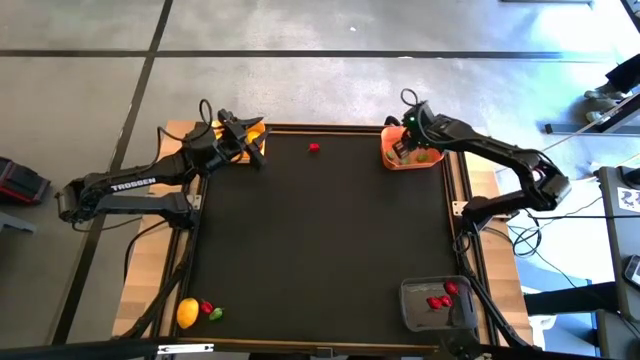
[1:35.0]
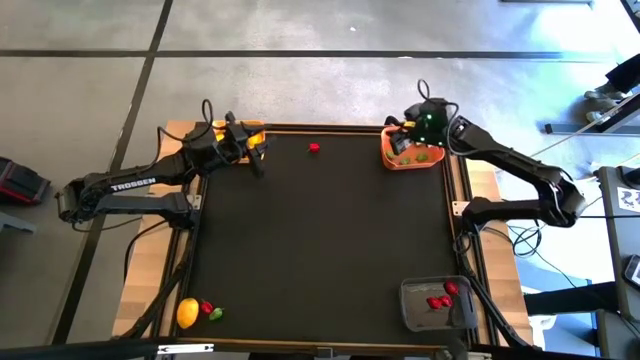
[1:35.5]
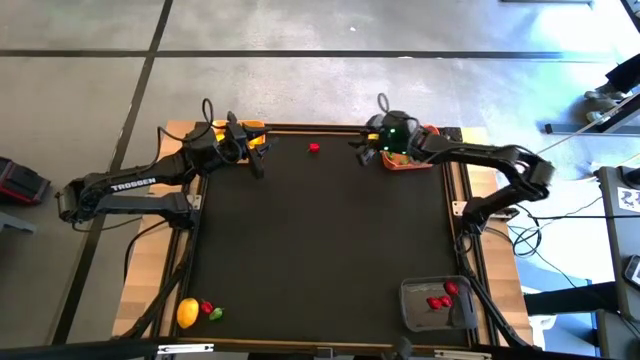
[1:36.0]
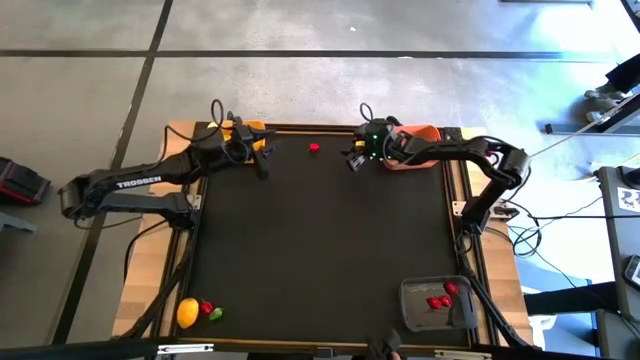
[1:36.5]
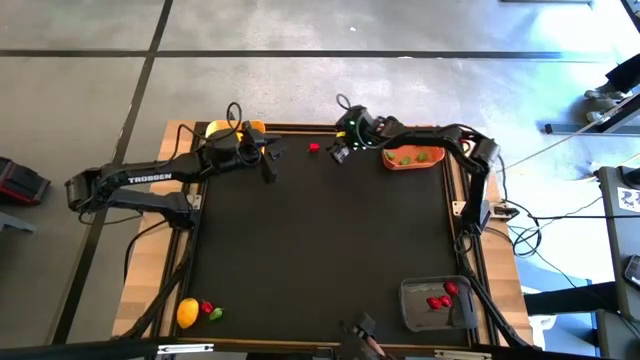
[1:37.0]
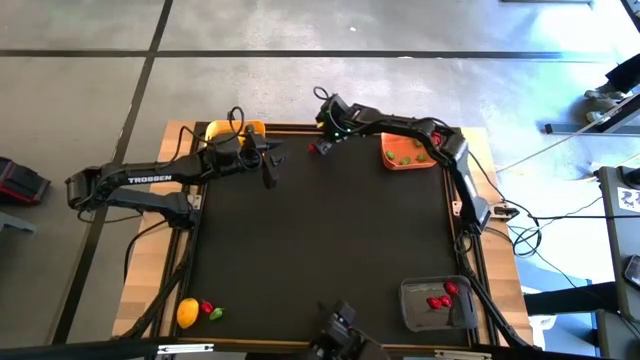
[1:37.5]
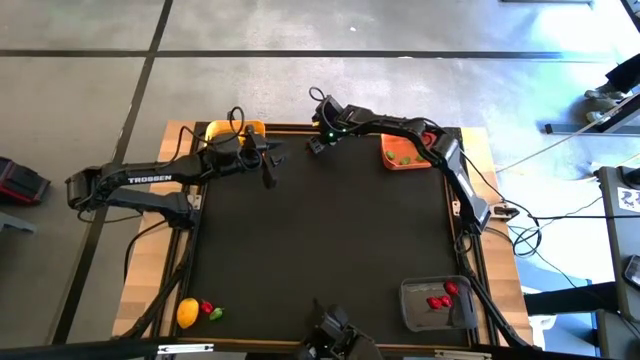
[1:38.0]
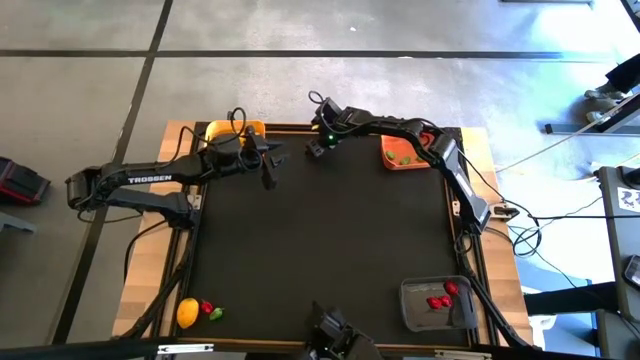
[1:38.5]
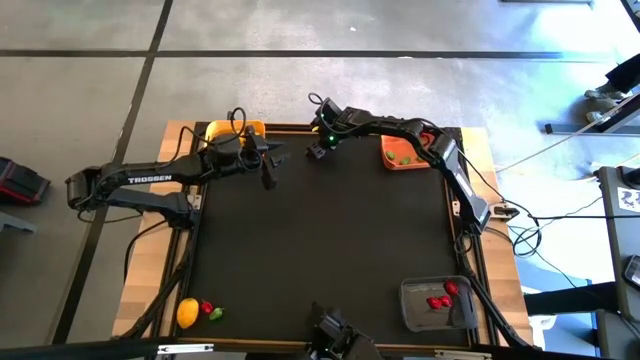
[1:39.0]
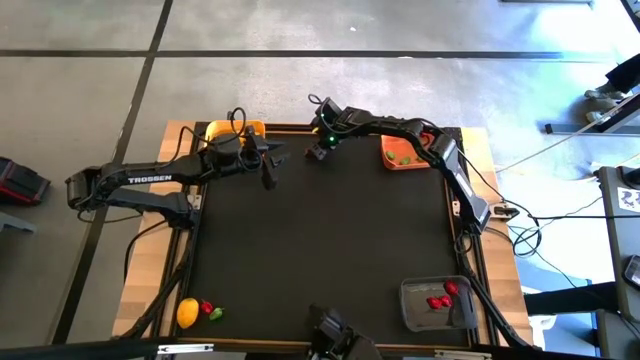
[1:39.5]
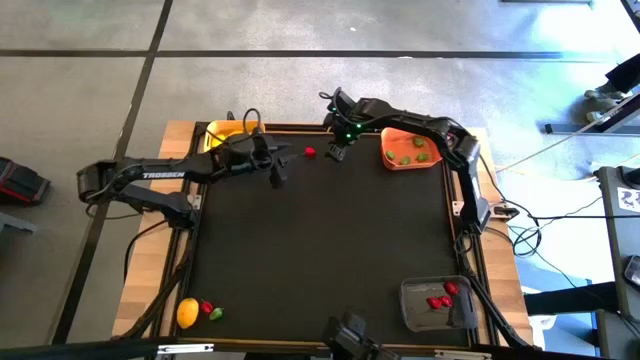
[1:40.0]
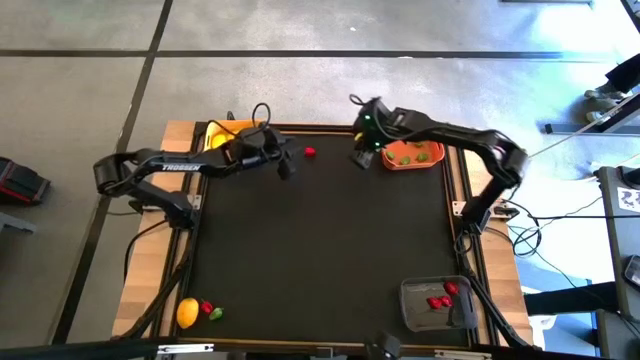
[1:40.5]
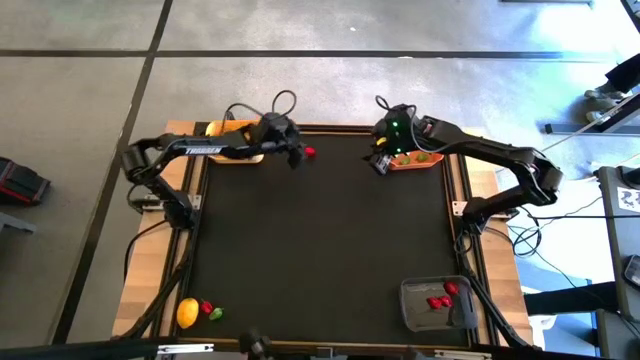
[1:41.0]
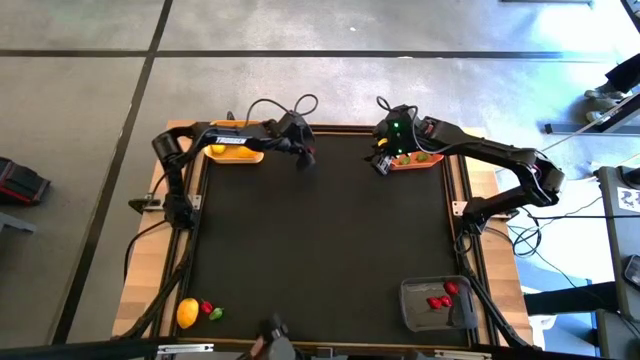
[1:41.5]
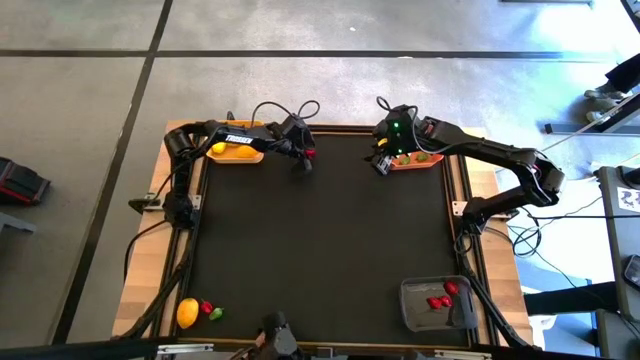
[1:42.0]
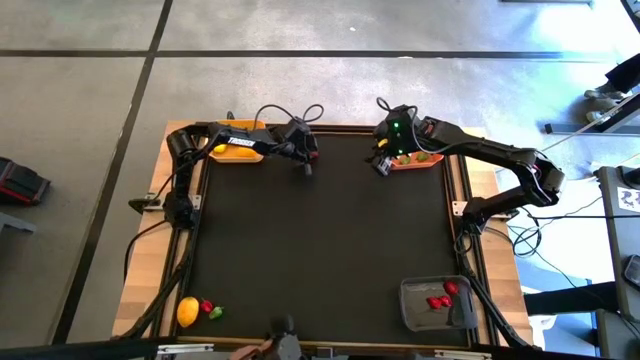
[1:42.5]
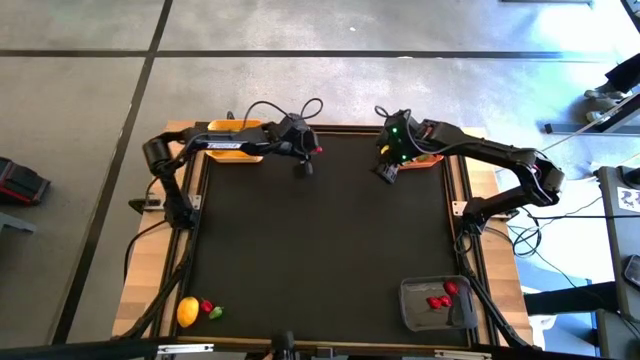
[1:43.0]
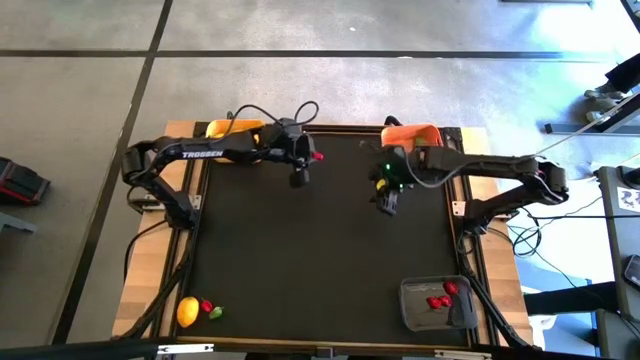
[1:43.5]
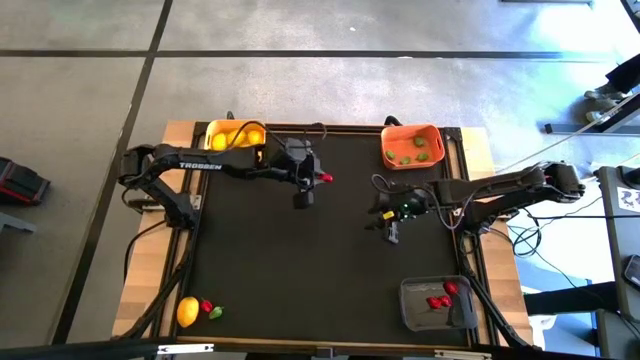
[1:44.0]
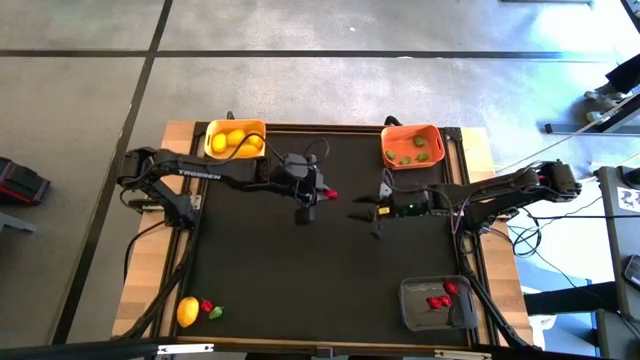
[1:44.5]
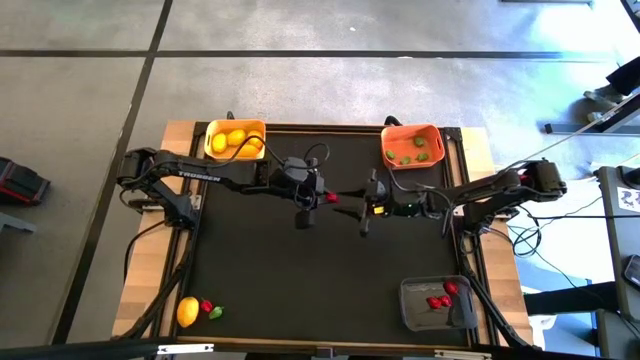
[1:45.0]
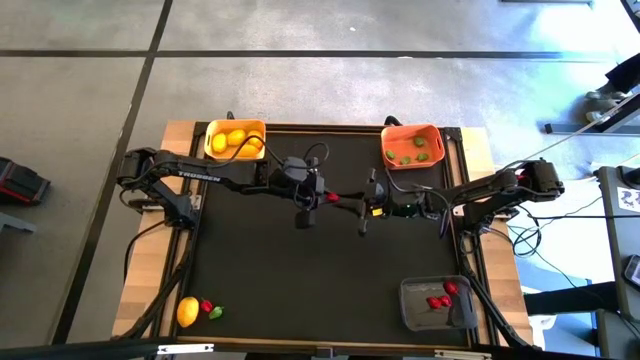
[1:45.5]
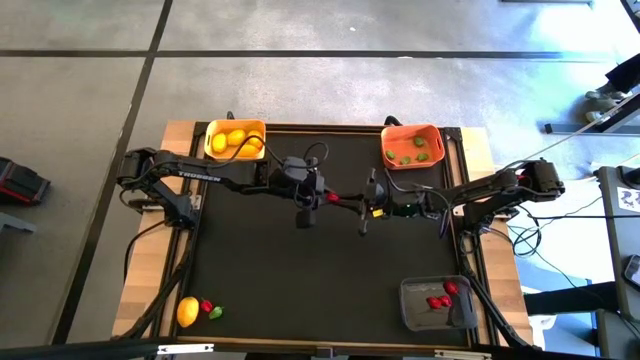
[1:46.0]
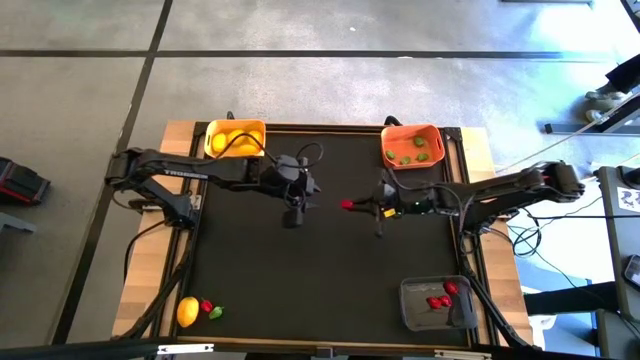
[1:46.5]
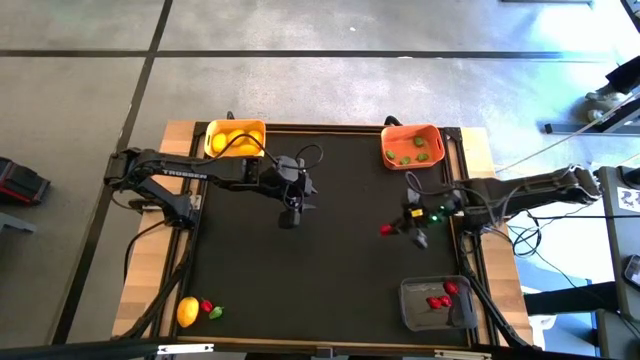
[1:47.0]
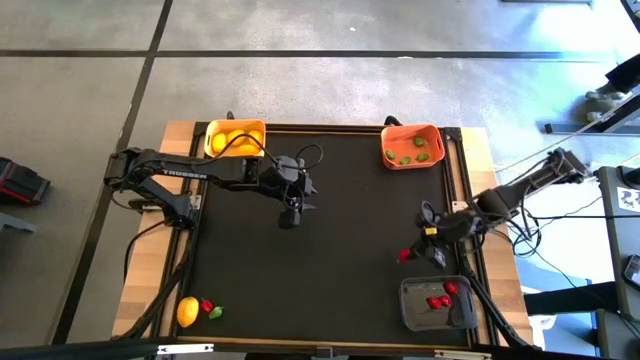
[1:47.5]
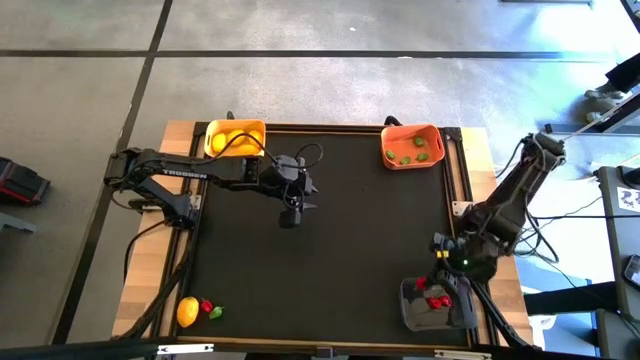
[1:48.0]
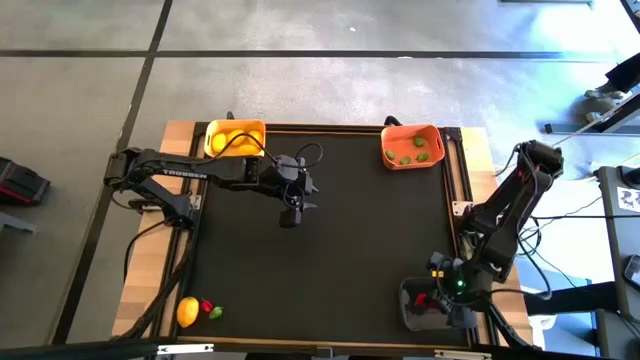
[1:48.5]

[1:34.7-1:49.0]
Task: Sort produce into baskets
Put the top red chili pepper into the gray bin

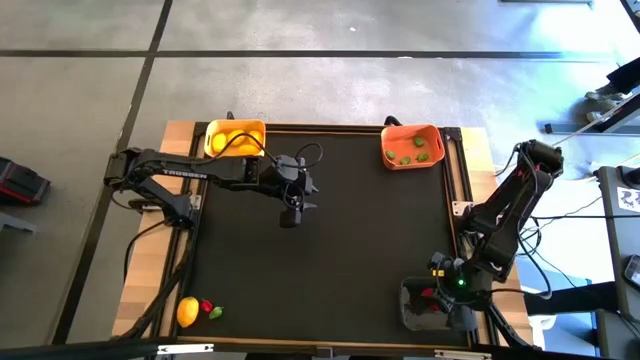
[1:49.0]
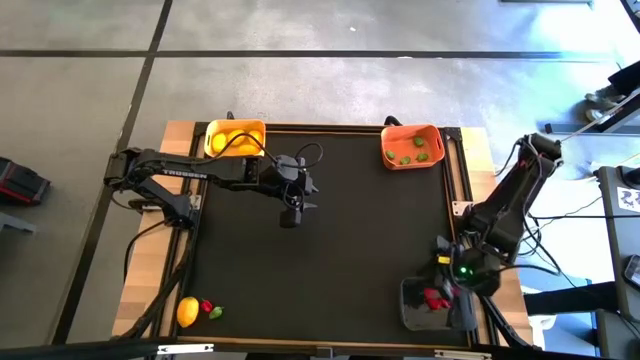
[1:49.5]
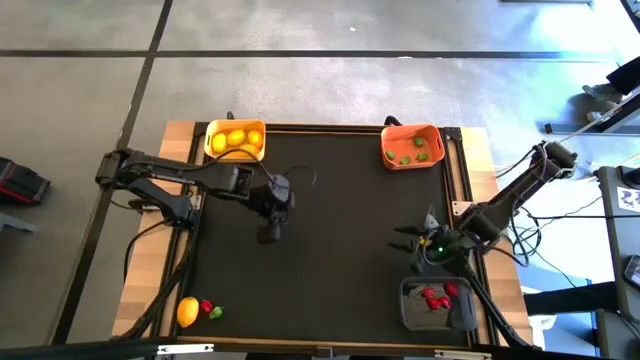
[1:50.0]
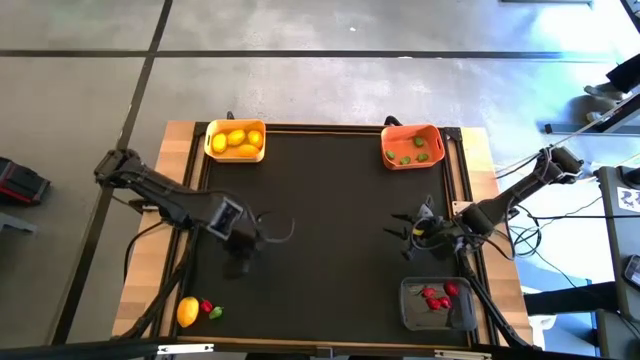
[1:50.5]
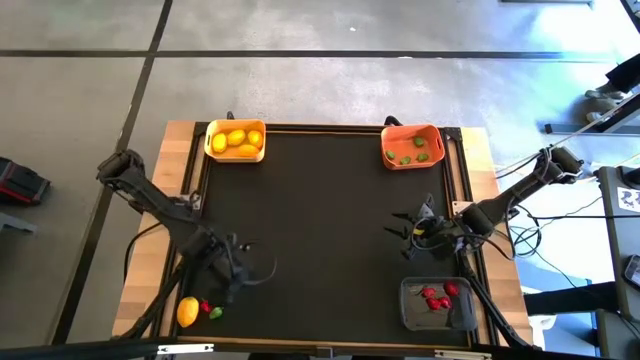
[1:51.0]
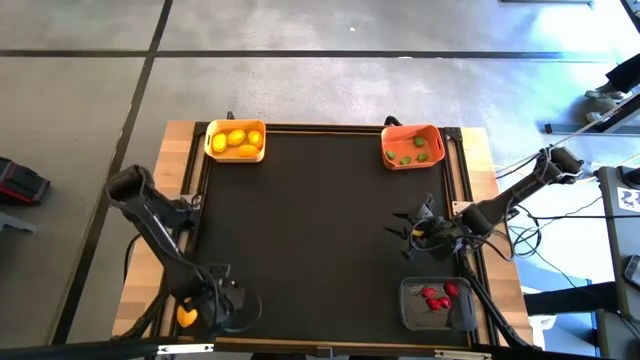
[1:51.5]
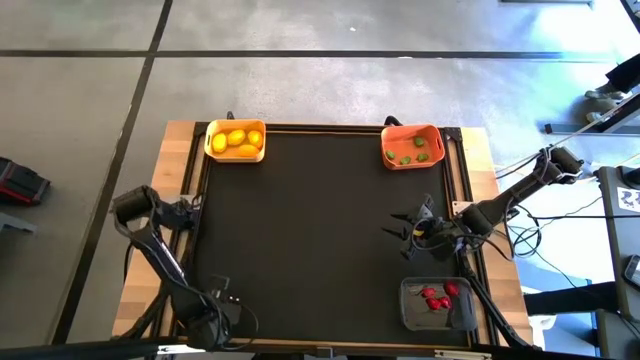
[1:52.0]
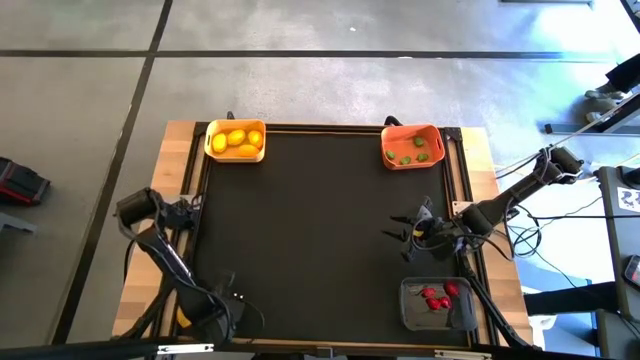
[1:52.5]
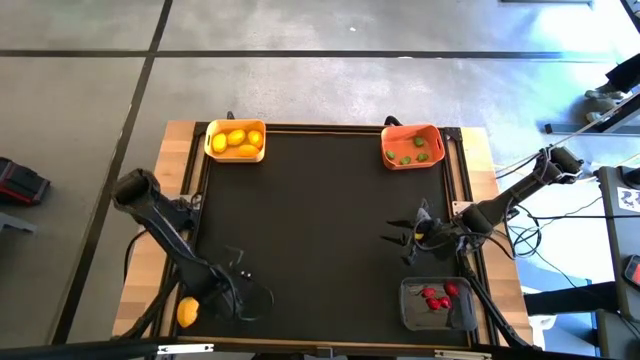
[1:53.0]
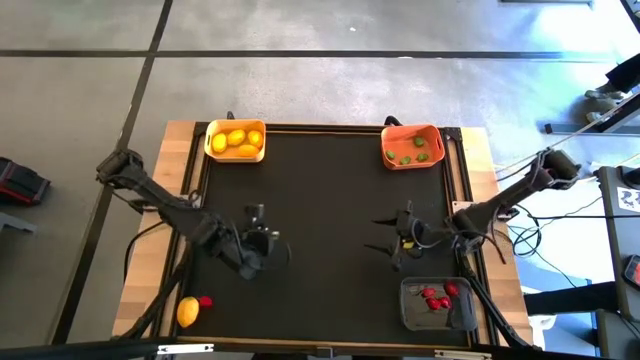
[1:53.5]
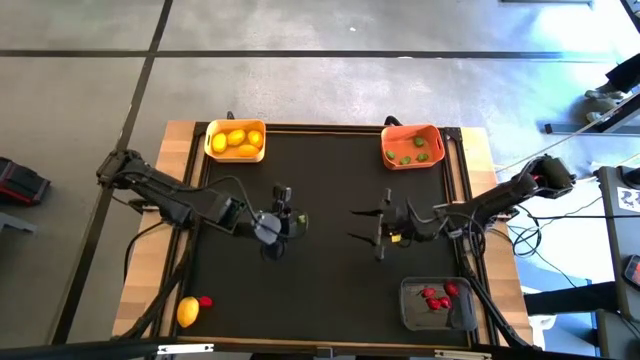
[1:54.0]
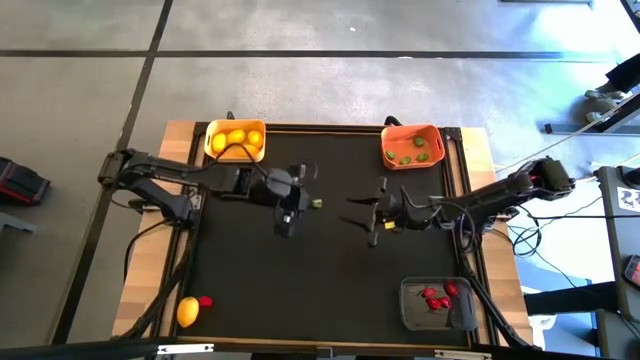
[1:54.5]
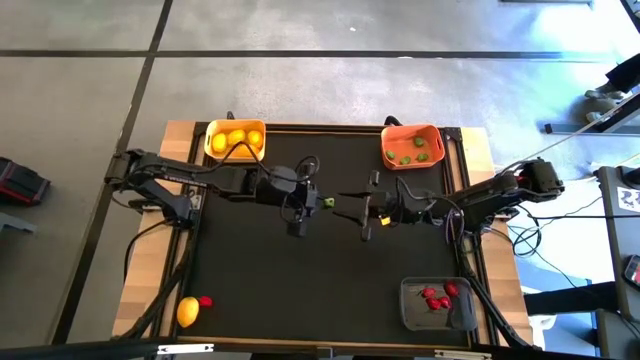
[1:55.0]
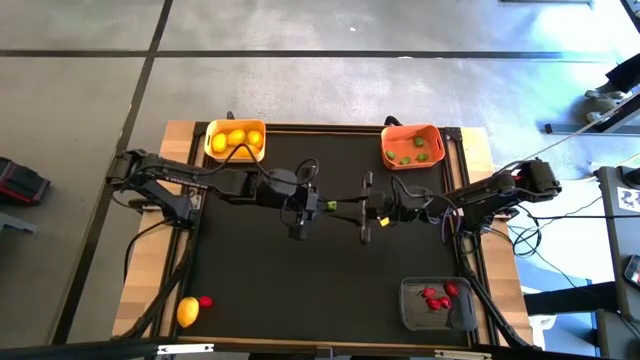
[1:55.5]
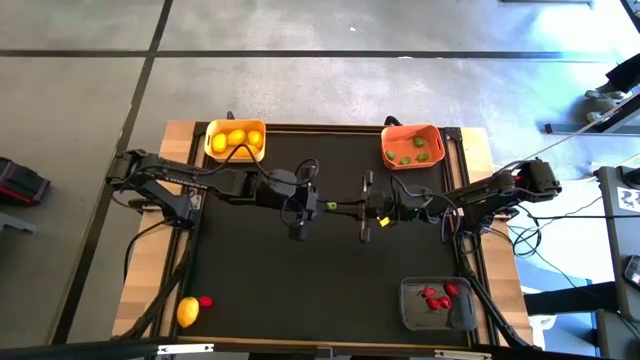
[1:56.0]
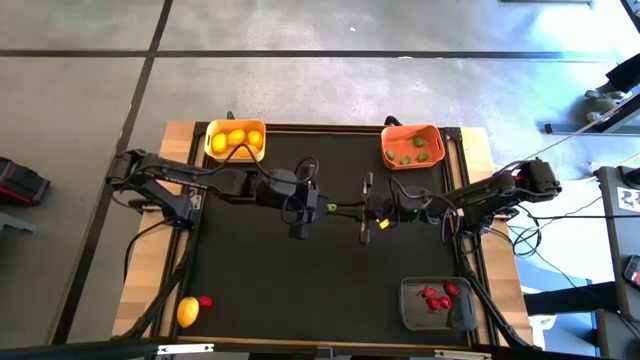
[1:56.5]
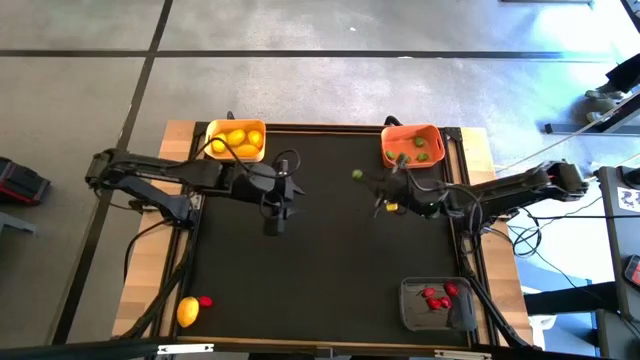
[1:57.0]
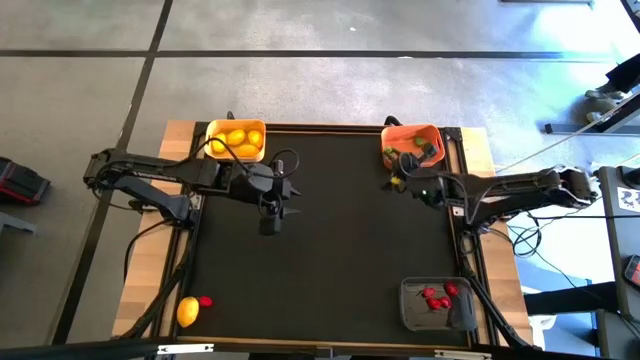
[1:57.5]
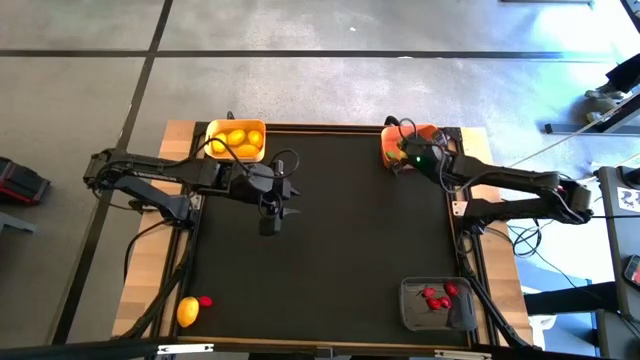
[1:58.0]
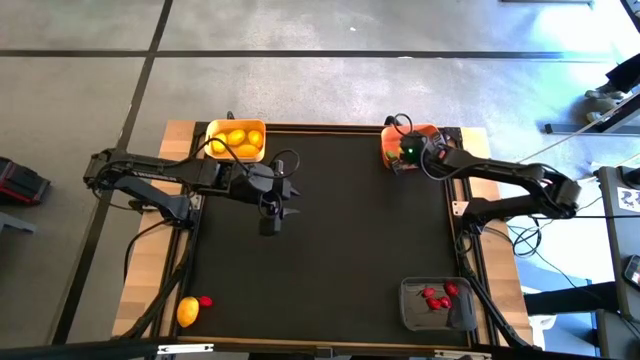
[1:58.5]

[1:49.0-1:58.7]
Put the green chili pepper into the orange bin
